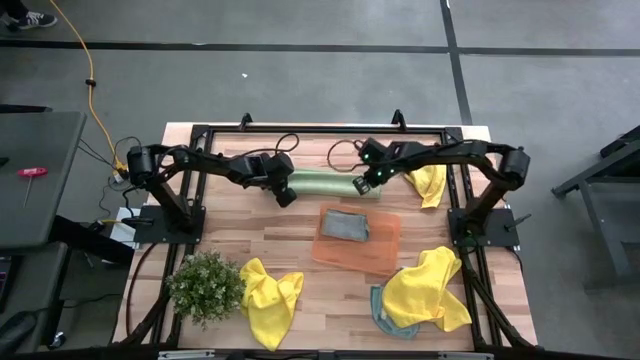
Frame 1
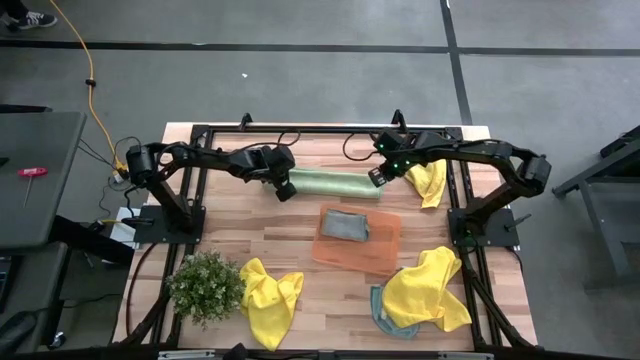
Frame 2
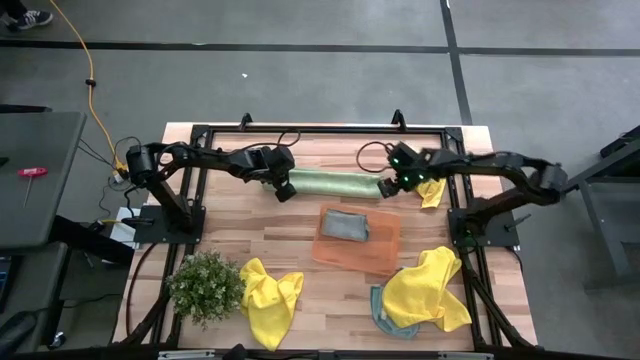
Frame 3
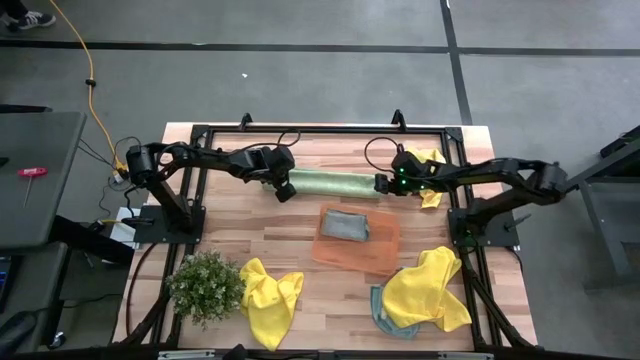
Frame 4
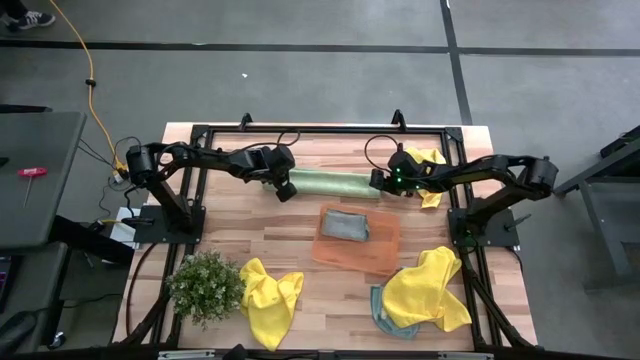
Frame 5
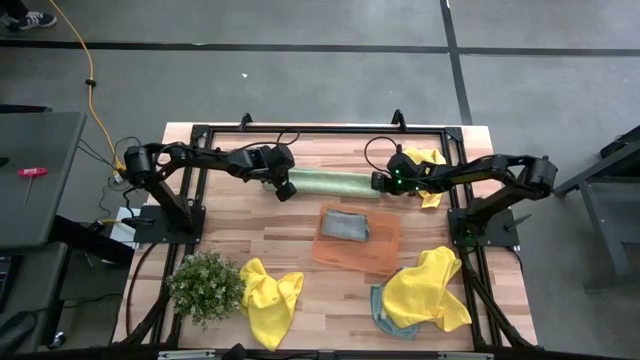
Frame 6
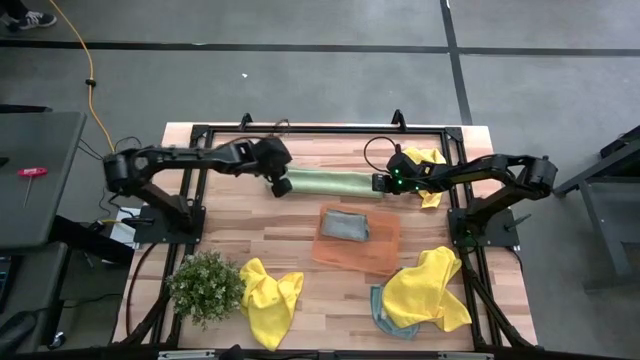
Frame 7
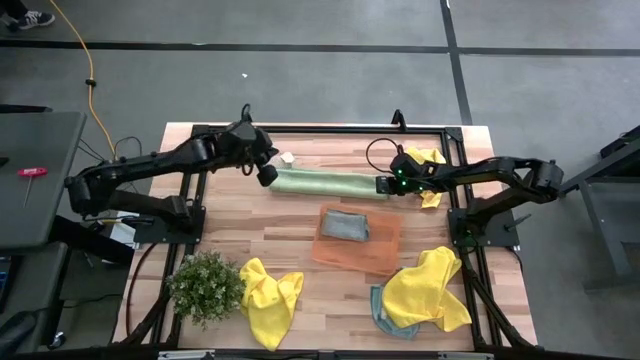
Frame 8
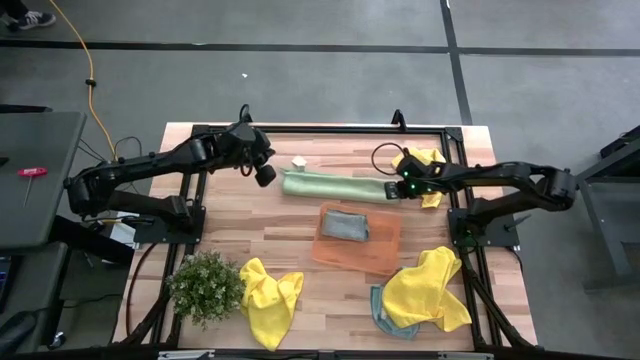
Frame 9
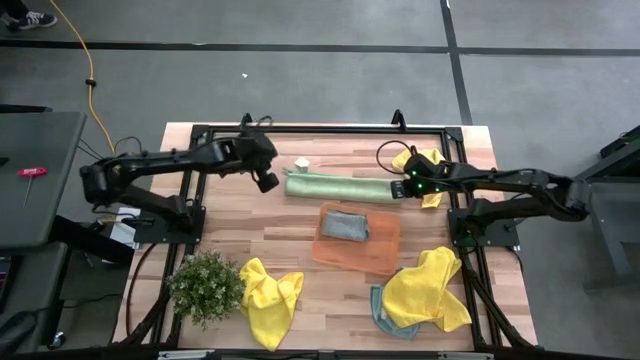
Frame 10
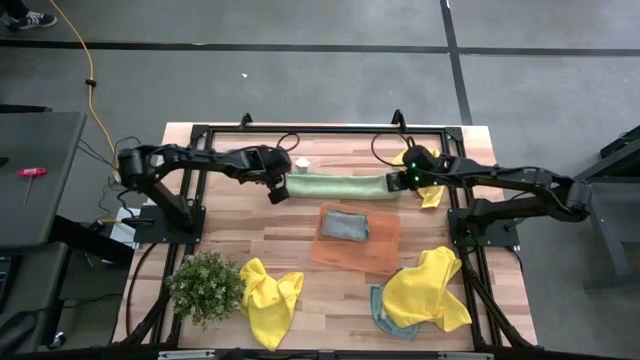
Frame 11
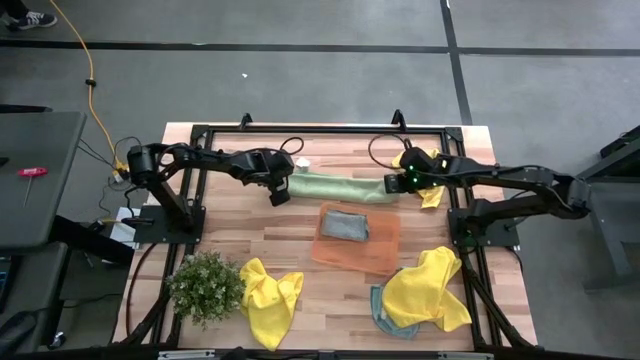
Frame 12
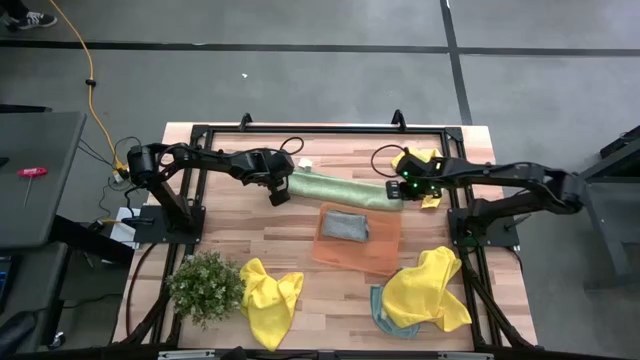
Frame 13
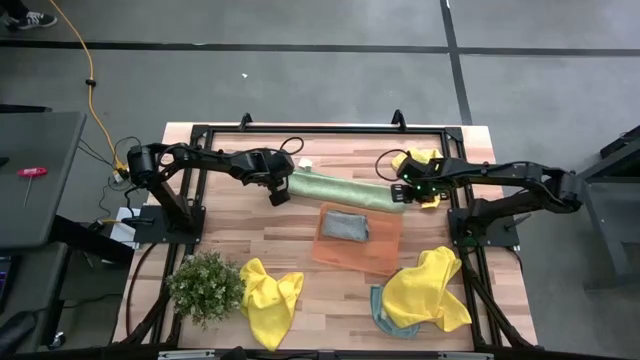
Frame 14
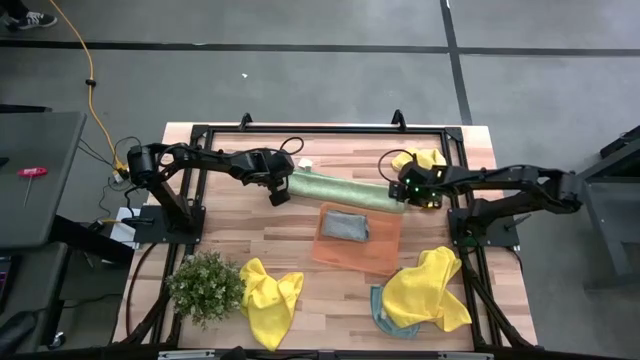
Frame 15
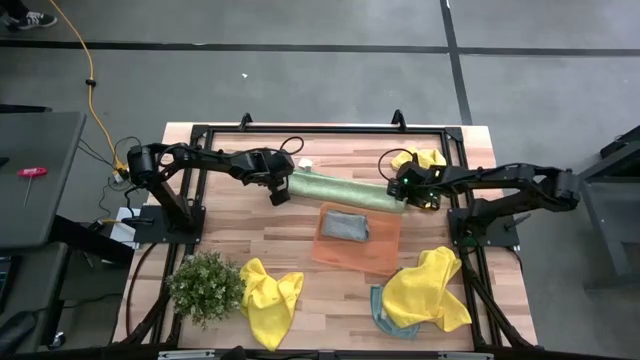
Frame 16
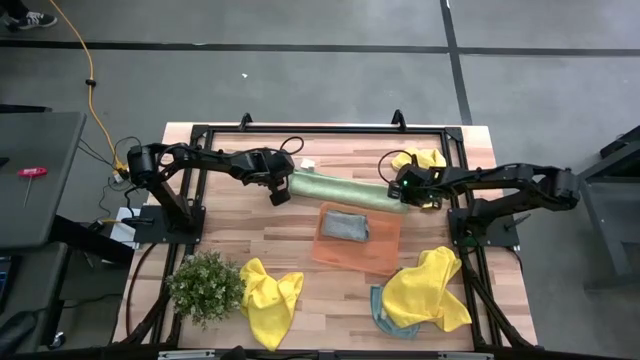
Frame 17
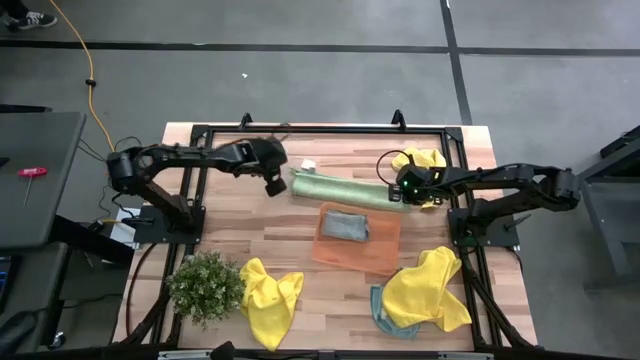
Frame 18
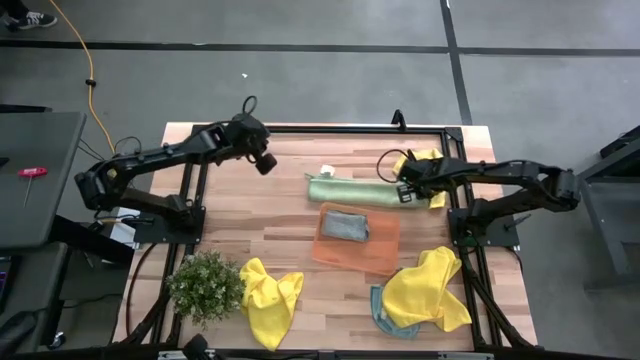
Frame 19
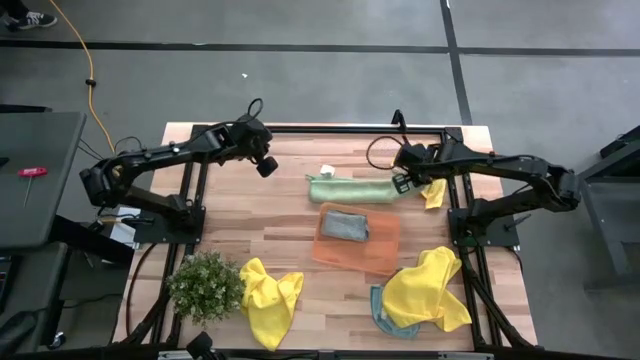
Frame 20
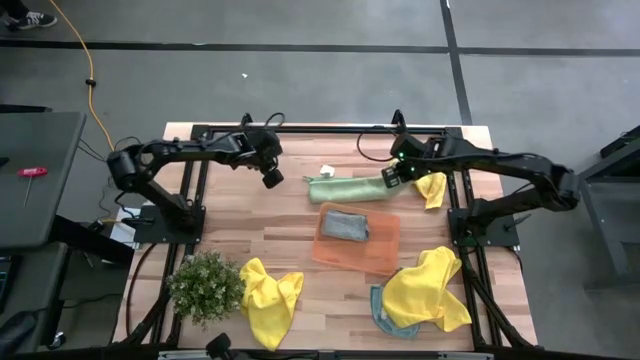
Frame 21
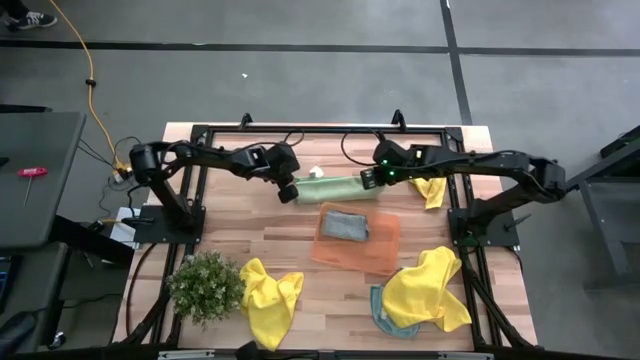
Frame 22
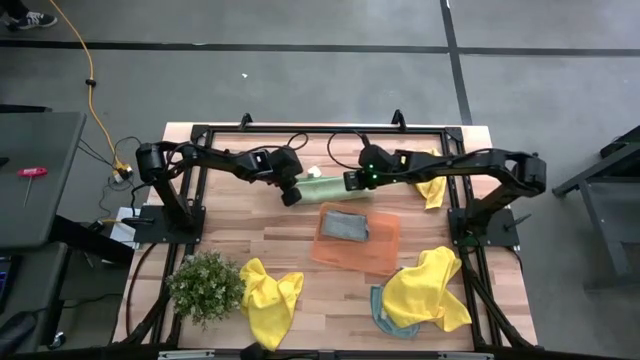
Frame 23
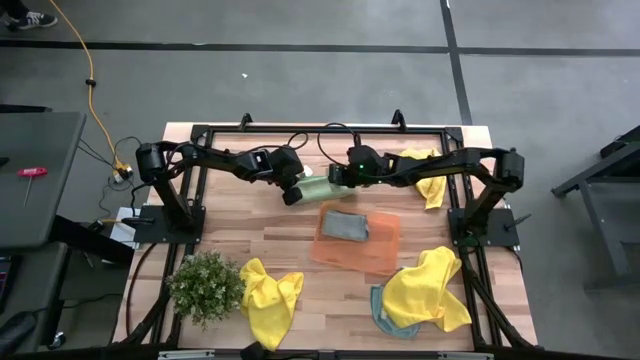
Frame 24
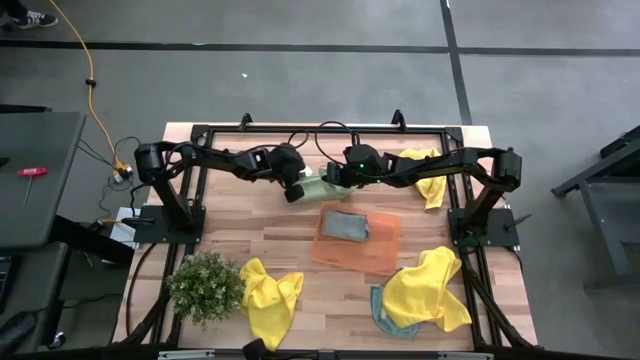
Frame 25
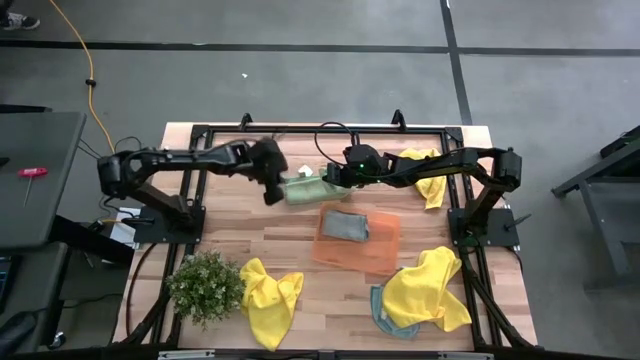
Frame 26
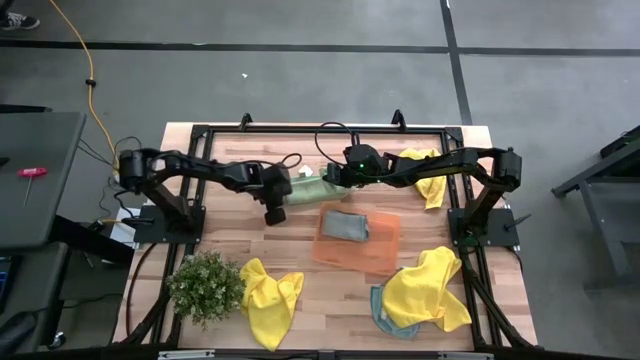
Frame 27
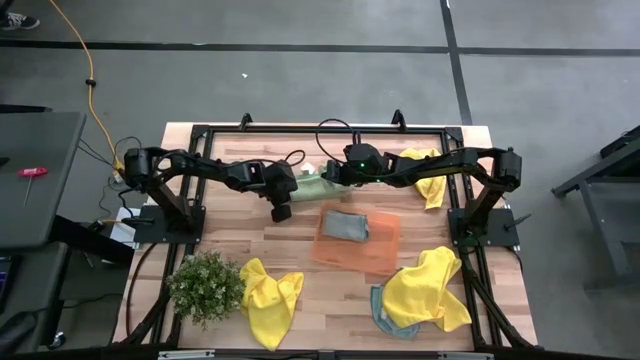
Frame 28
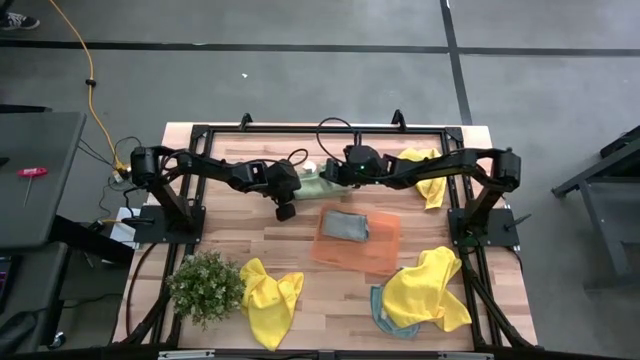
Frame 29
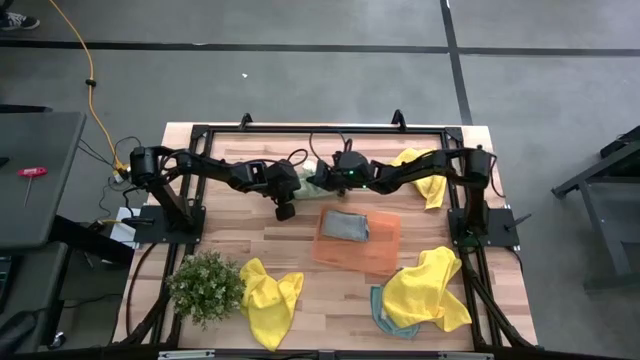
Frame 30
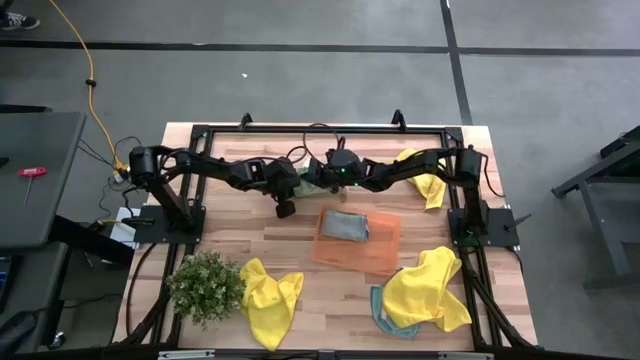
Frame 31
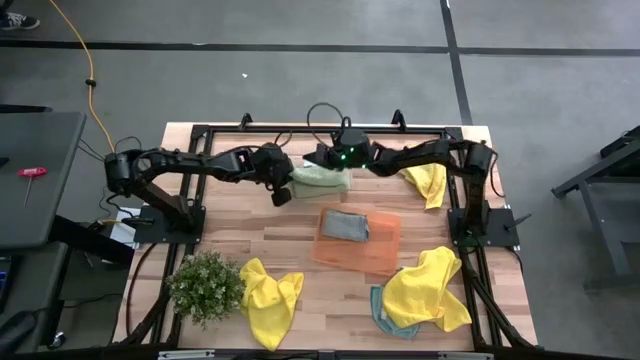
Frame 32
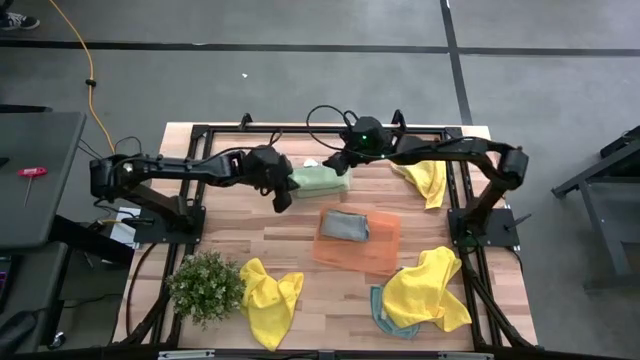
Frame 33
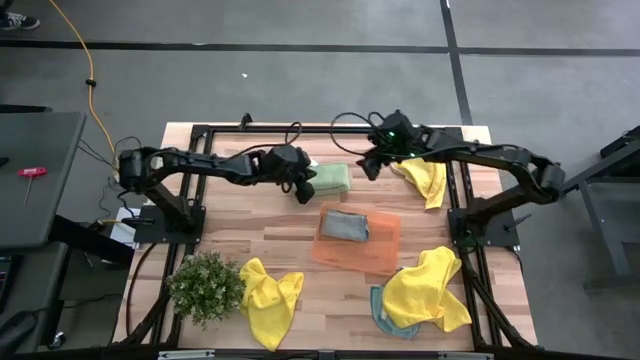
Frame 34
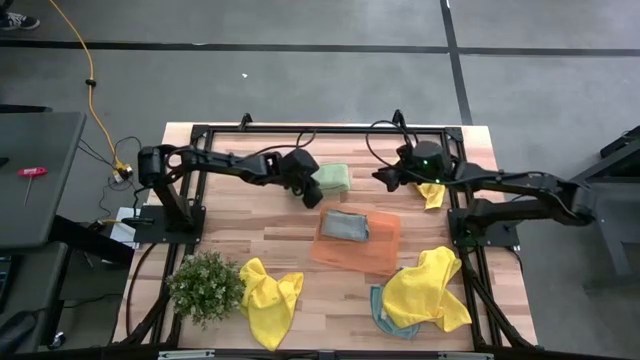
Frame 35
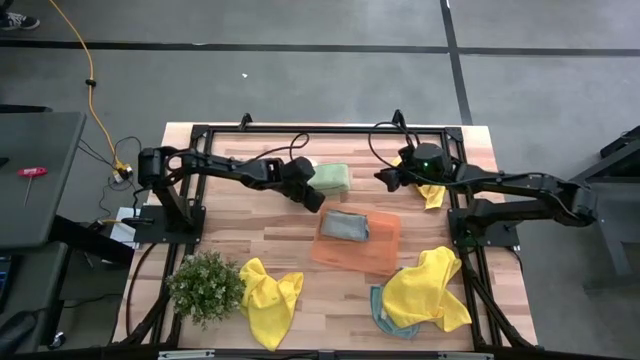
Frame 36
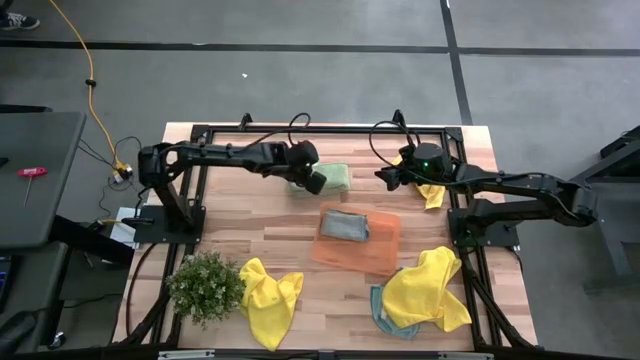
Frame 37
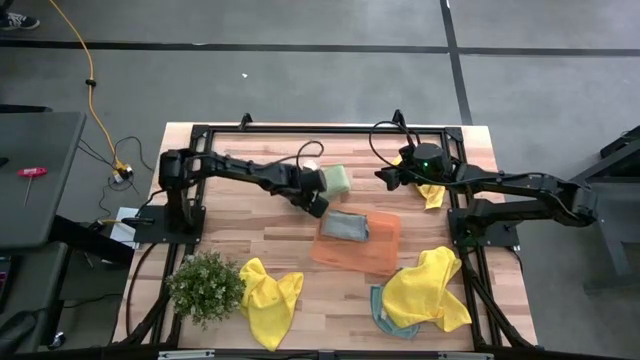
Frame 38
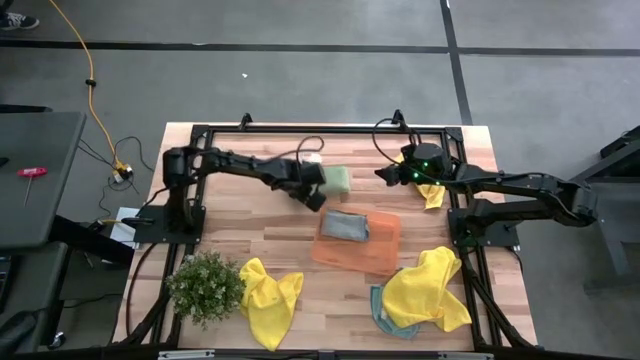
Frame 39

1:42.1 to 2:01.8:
Task: Fold microfiber towels
Fold the green microfiber towel
